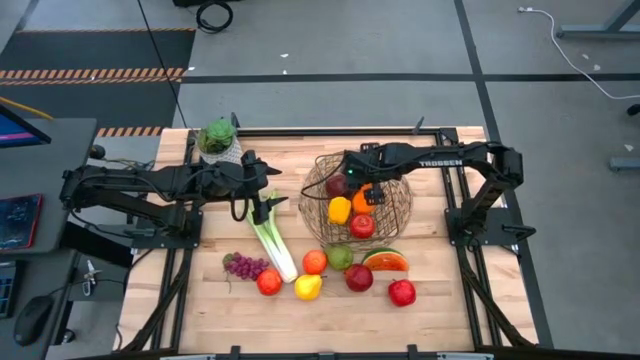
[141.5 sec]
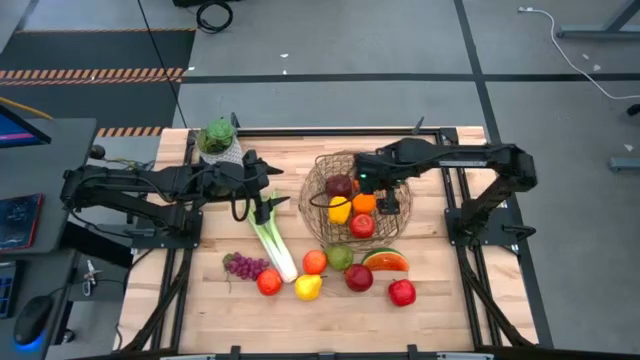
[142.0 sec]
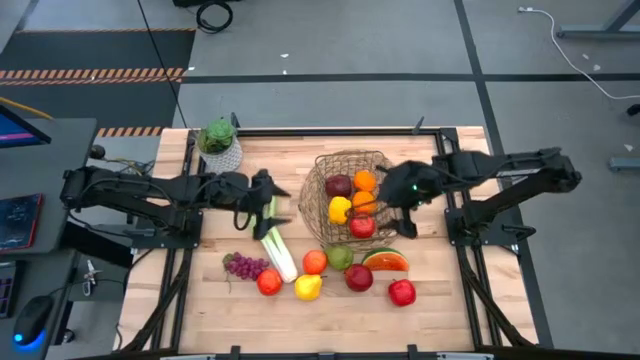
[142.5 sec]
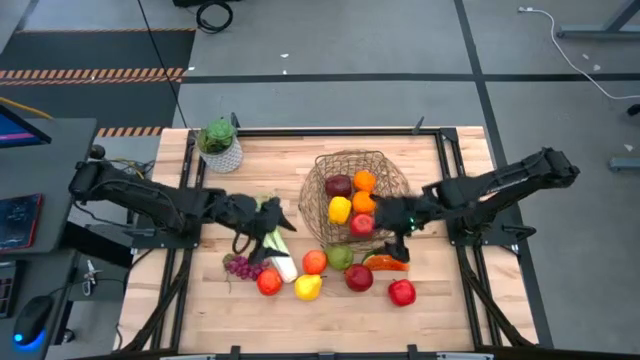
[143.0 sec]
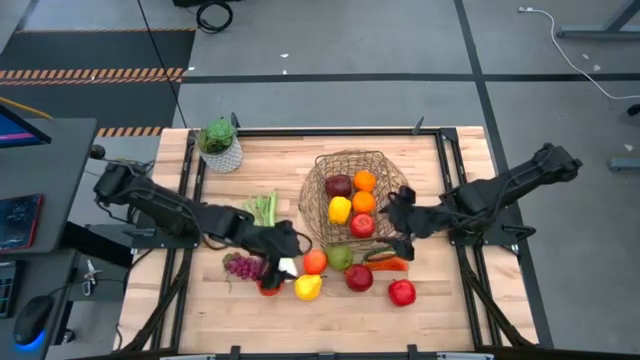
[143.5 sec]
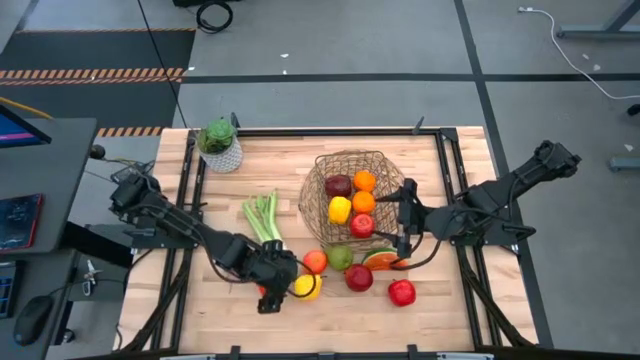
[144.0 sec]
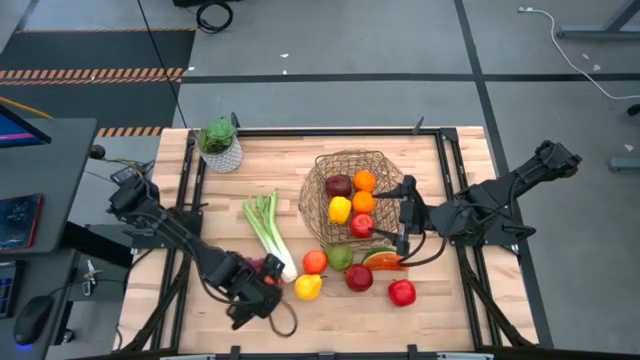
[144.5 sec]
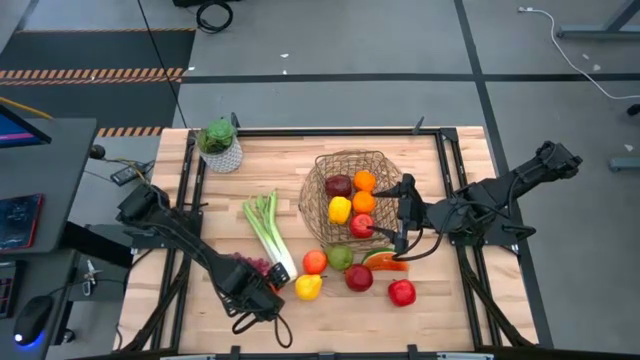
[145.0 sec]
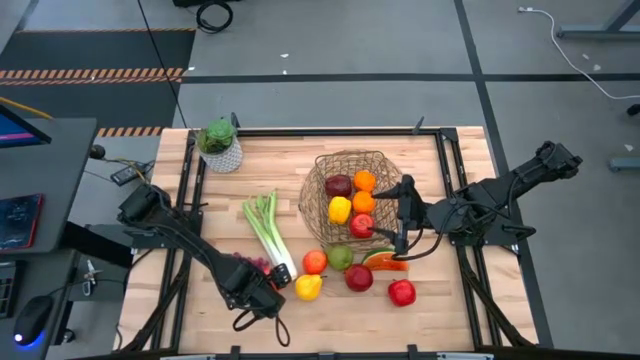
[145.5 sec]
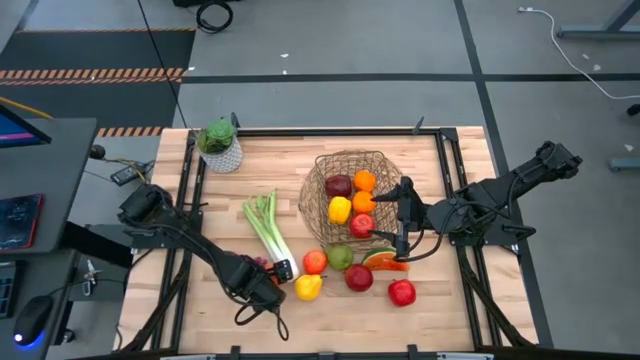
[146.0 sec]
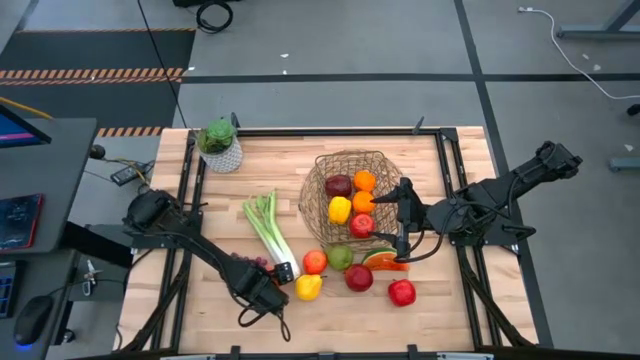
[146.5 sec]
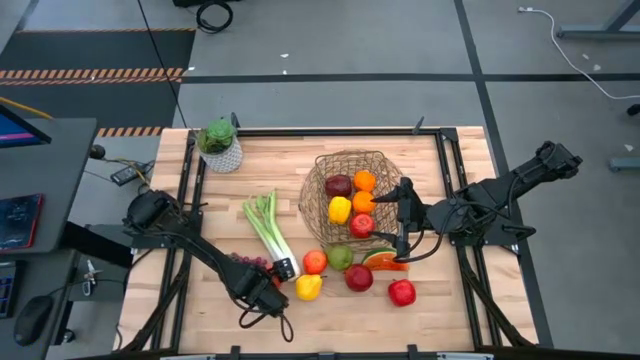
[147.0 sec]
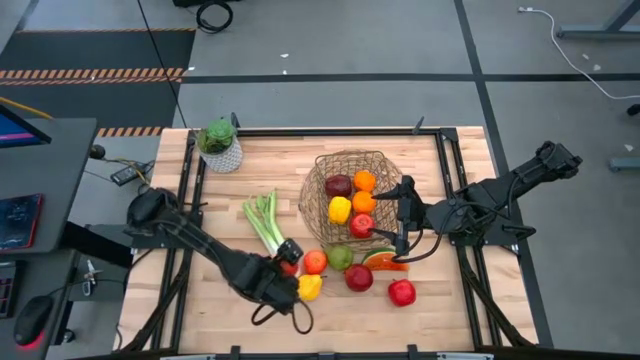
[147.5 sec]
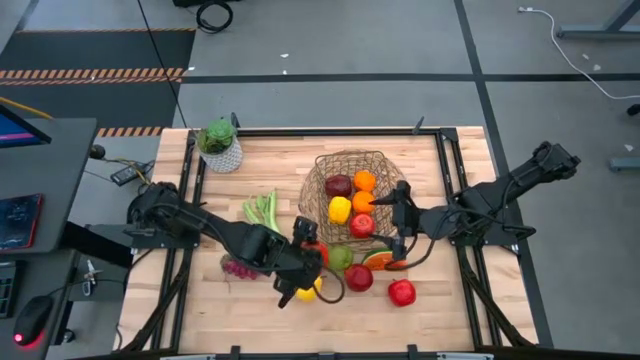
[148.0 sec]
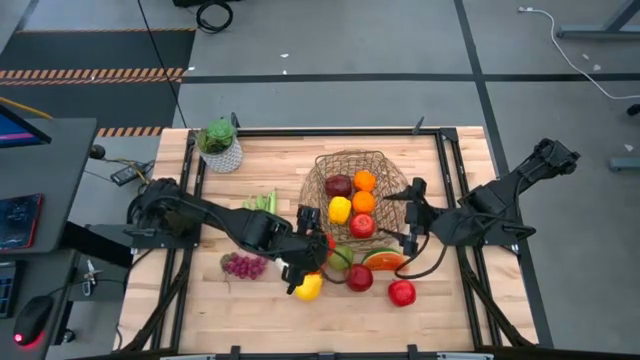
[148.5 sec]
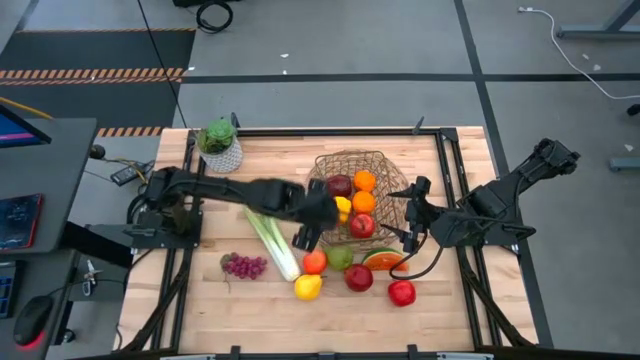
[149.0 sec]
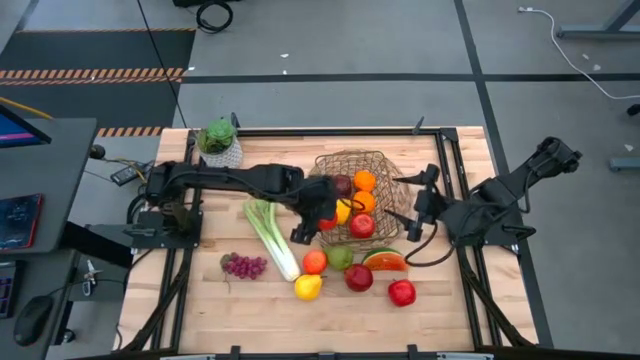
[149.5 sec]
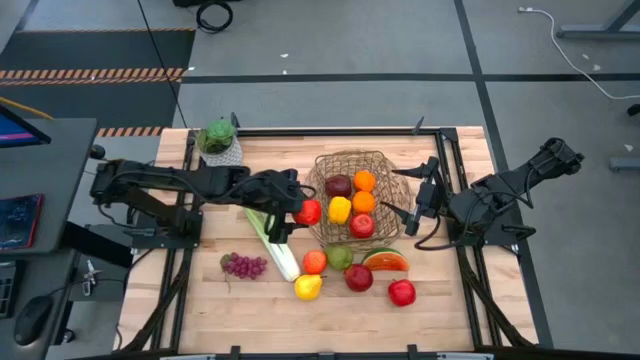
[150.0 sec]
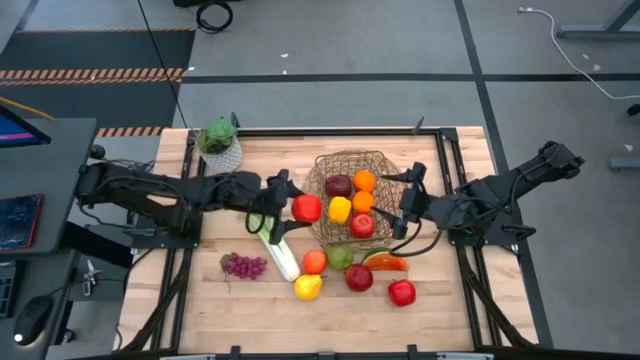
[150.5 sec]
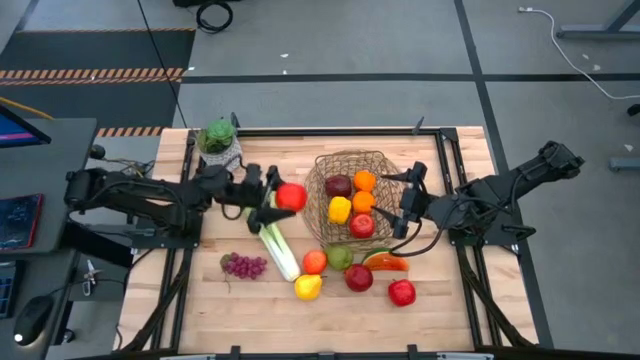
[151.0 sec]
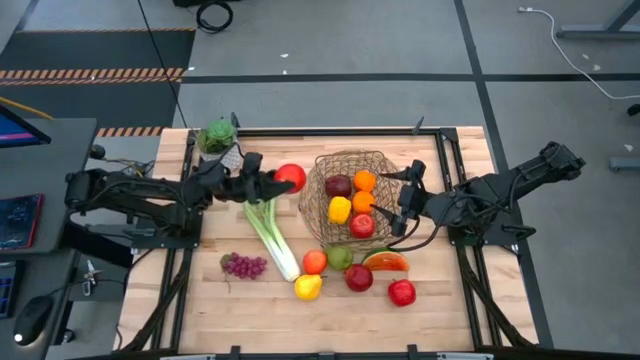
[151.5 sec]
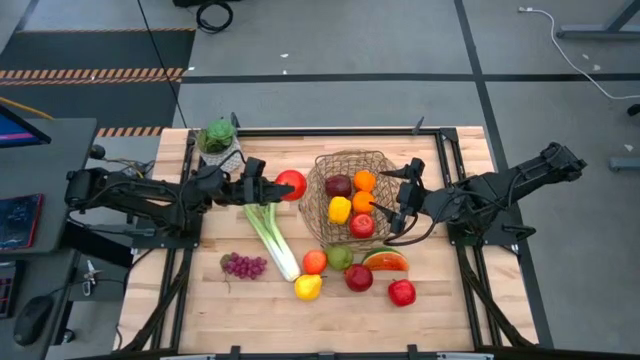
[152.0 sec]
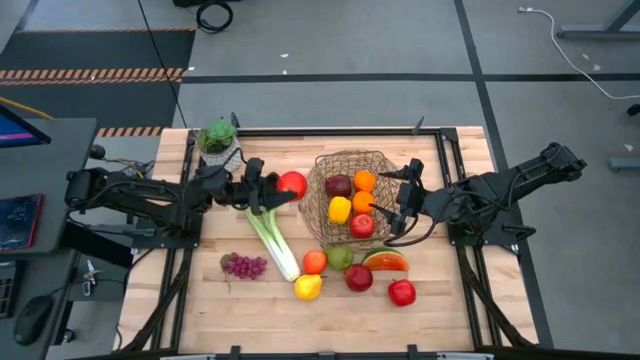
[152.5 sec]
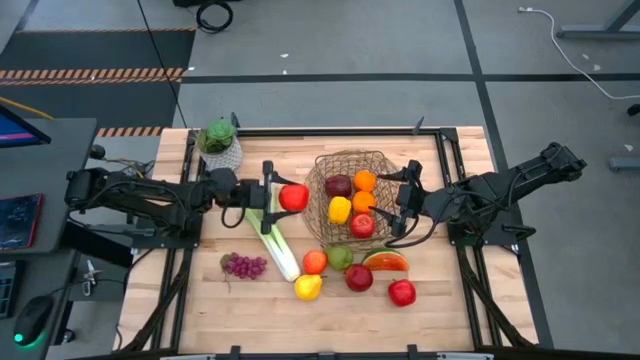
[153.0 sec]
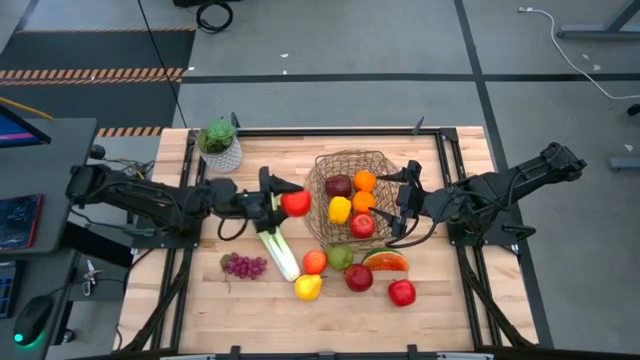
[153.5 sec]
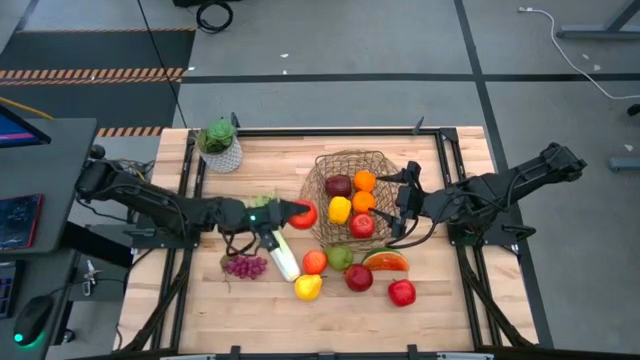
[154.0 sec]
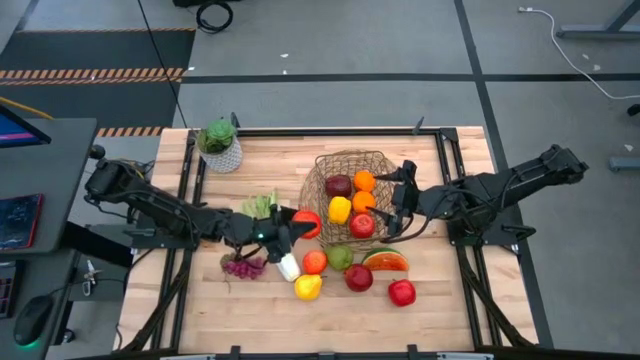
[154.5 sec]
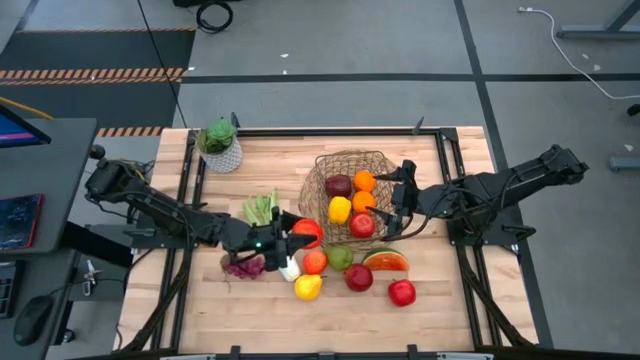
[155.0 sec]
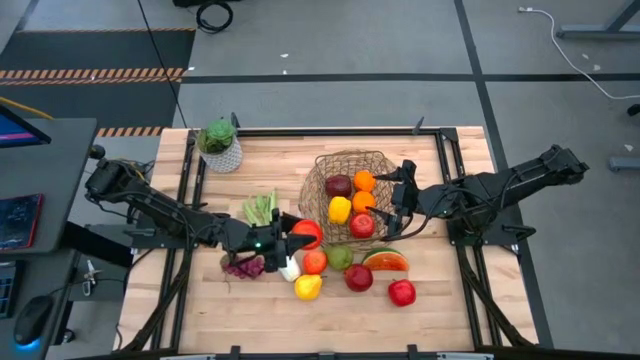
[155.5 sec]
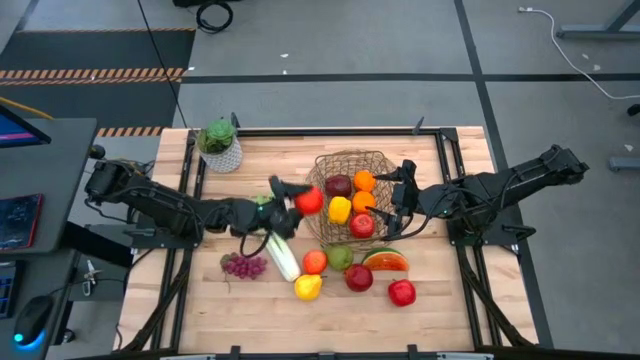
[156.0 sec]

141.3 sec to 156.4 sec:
Task: Build produce basket
Put the red apple into the brown wire basket

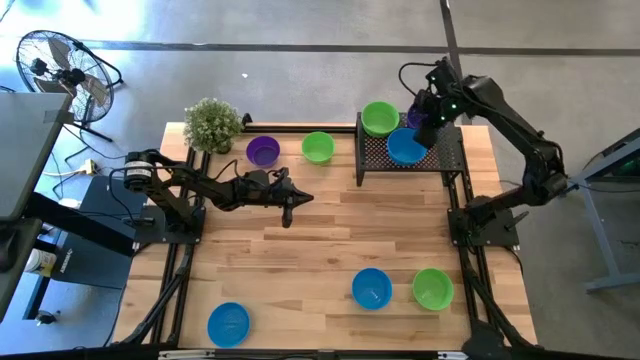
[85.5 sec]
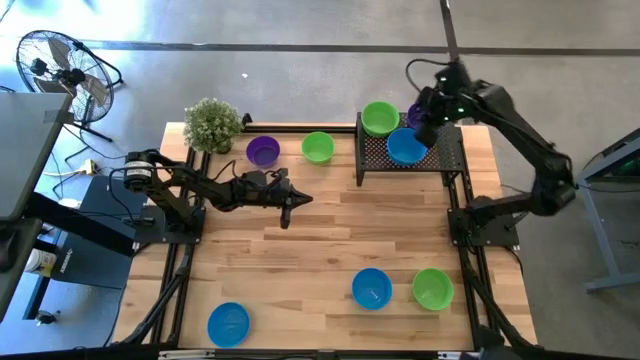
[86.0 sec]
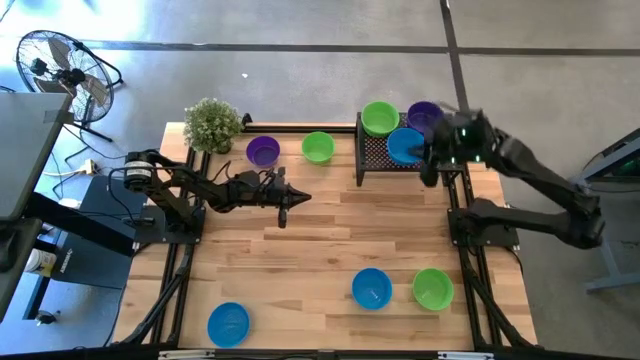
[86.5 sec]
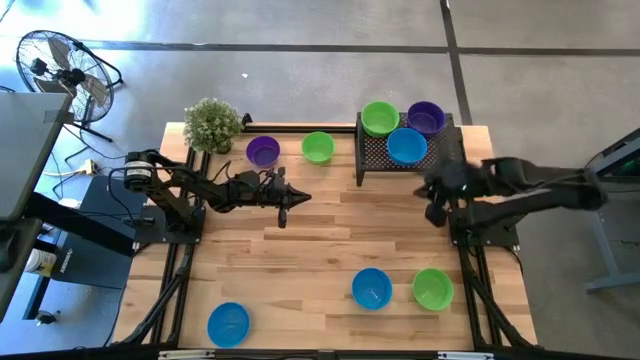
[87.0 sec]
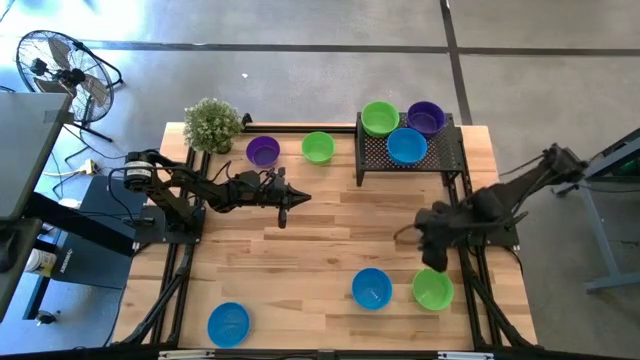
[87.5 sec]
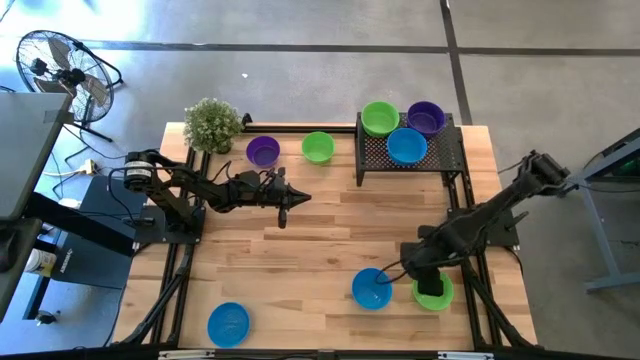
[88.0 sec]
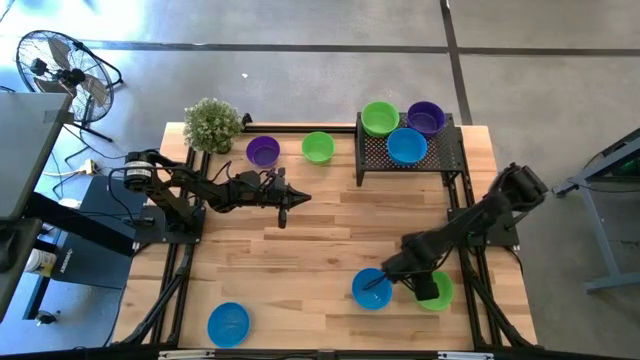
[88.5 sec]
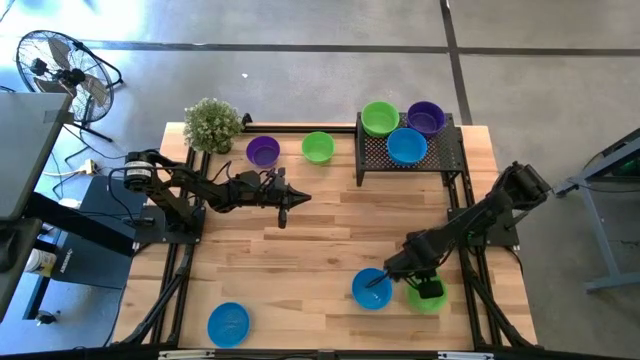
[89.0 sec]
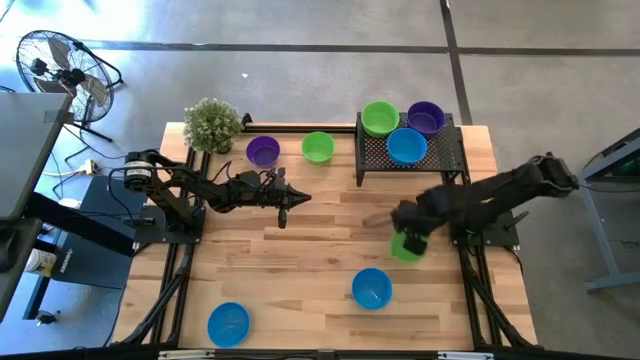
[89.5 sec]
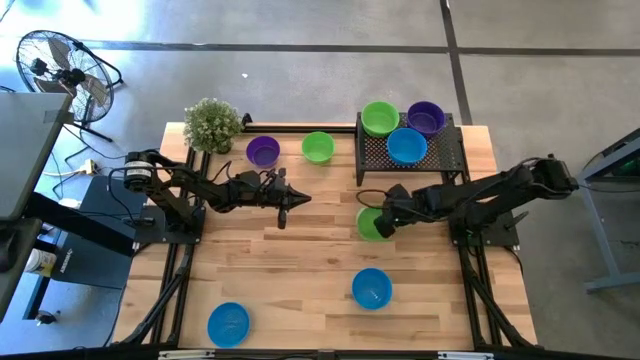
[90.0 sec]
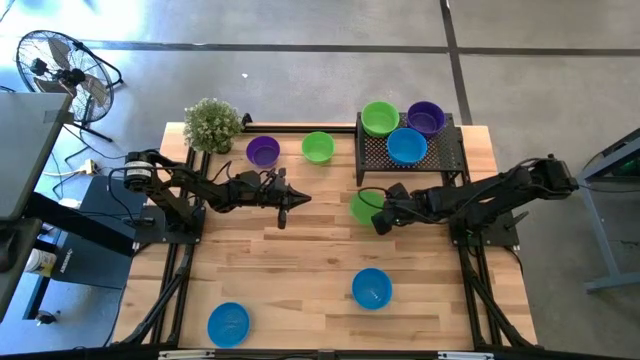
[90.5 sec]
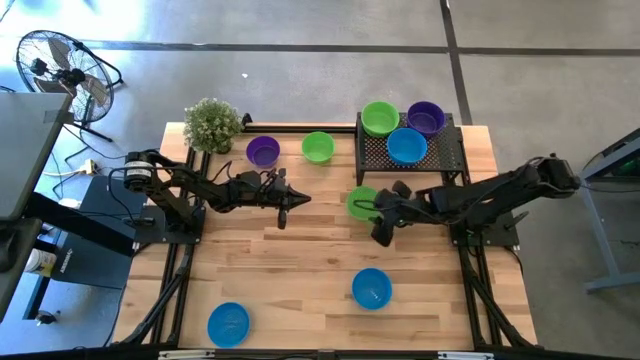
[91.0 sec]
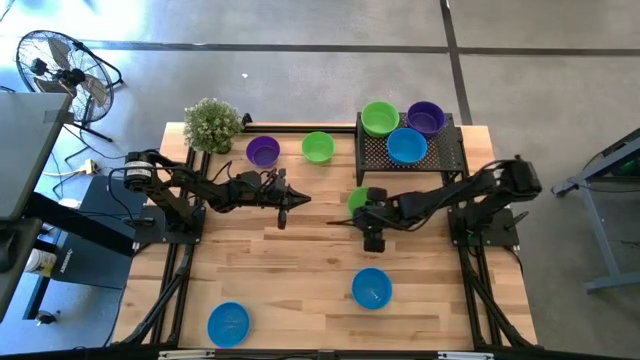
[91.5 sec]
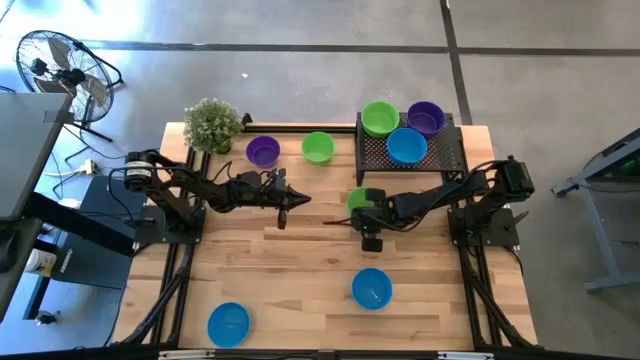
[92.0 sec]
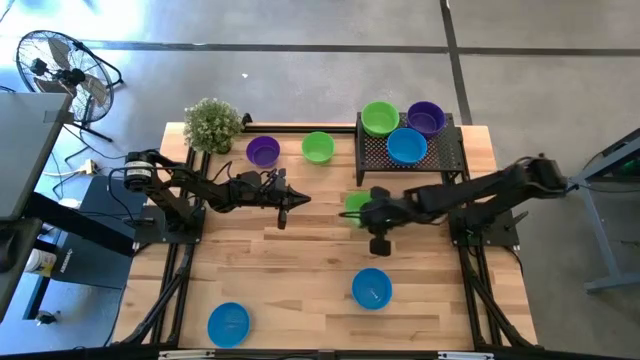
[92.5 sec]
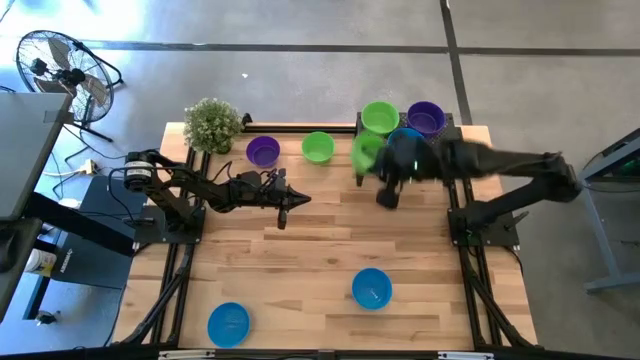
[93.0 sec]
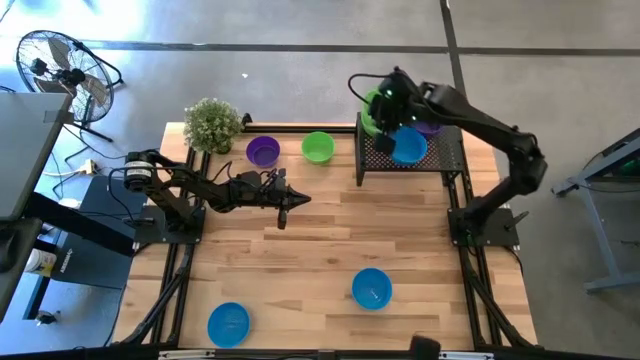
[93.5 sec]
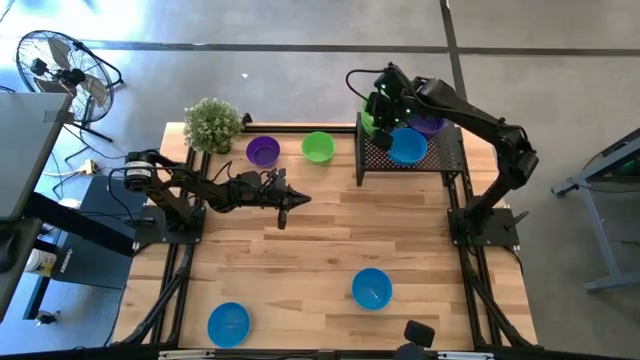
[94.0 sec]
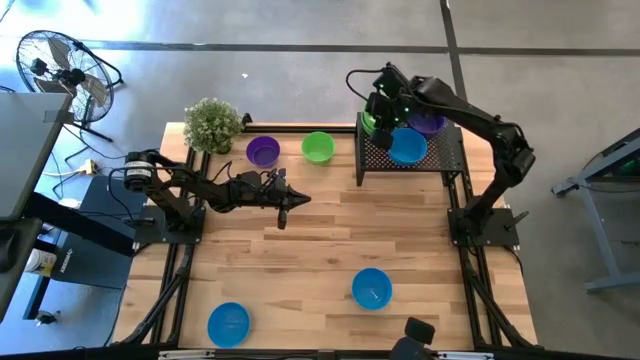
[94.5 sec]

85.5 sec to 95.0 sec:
Task: Pick & Place Mini bowls
Stack the green bowl on the other green bowls on the shelf
